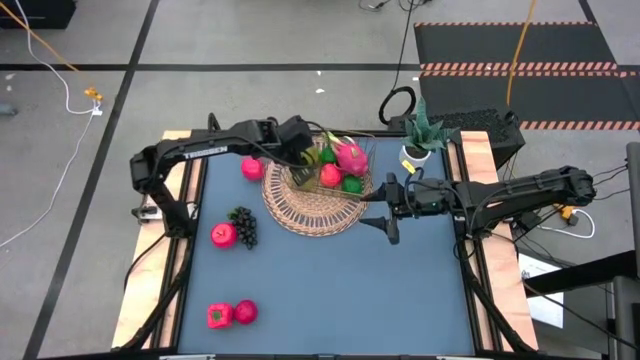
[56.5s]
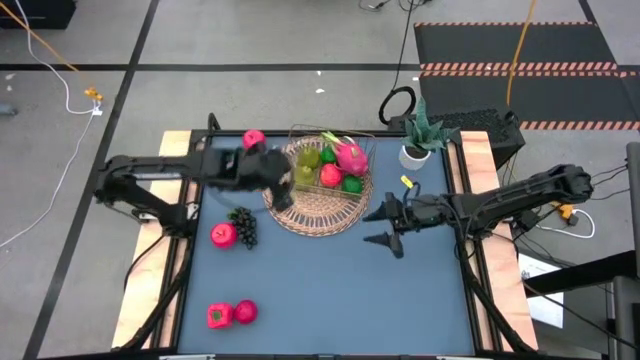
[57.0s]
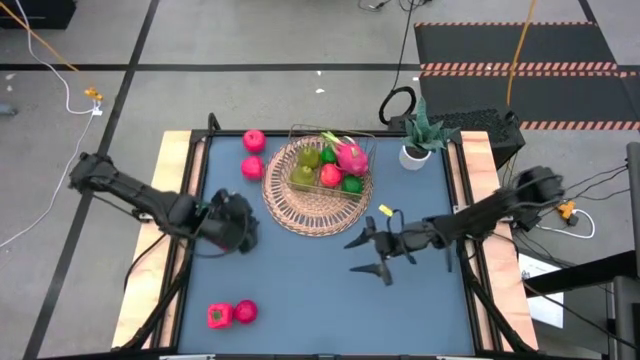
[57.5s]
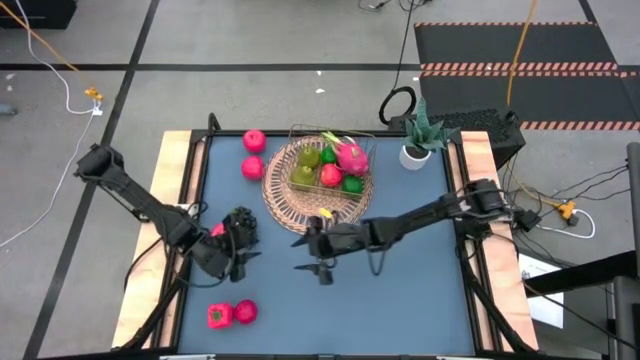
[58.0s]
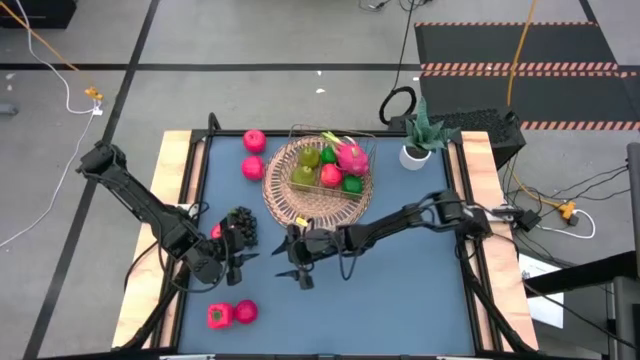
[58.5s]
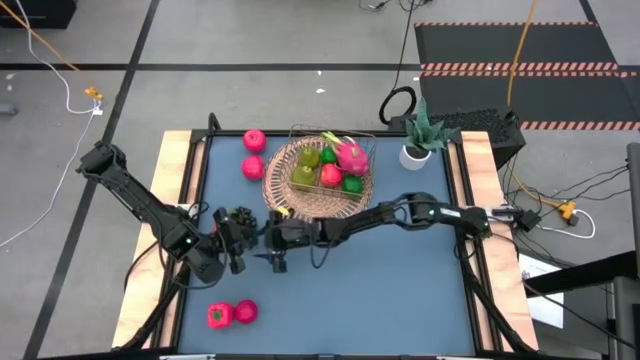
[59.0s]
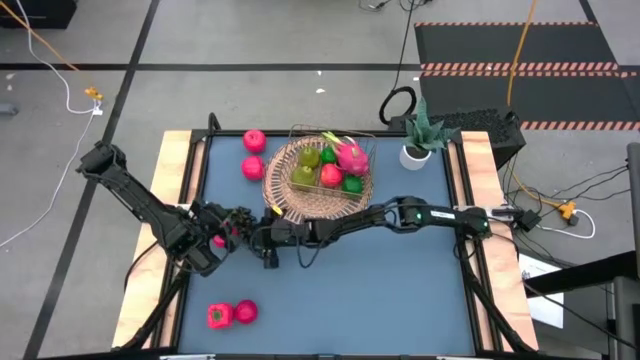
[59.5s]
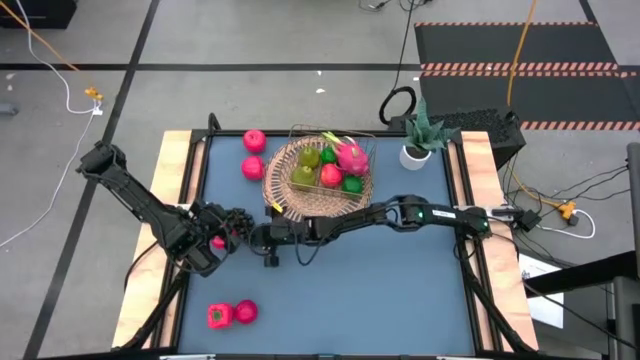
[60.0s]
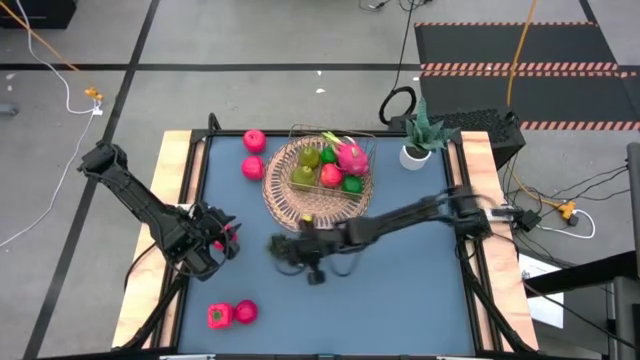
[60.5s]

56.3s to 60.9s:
Task: Build produce basket
Put the grapes into the gold wire basket

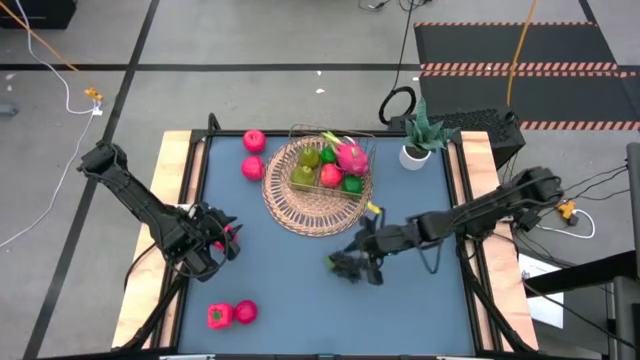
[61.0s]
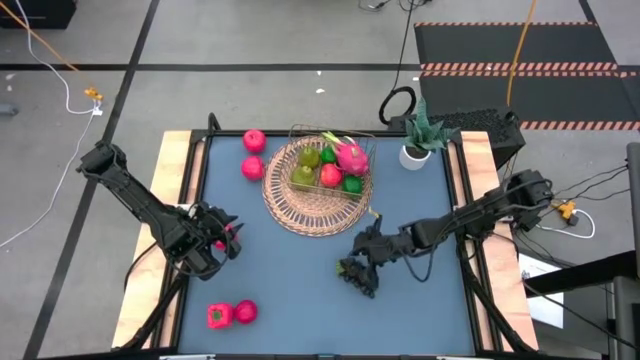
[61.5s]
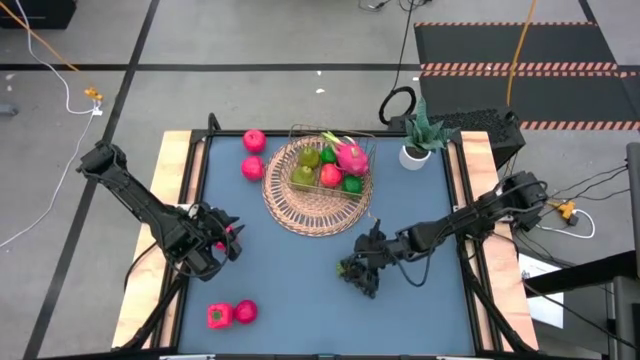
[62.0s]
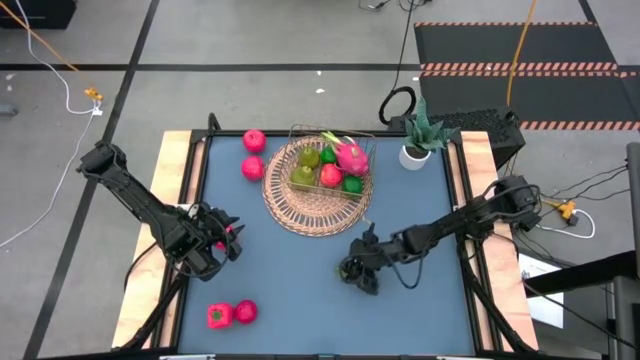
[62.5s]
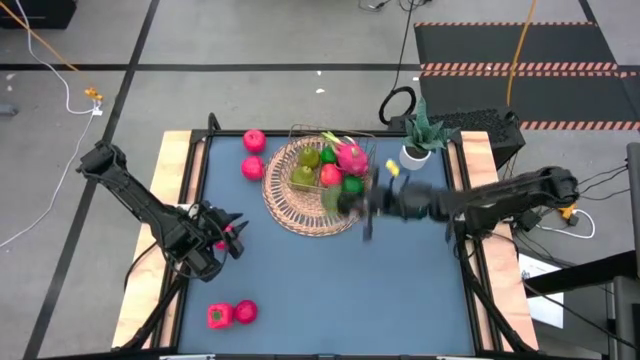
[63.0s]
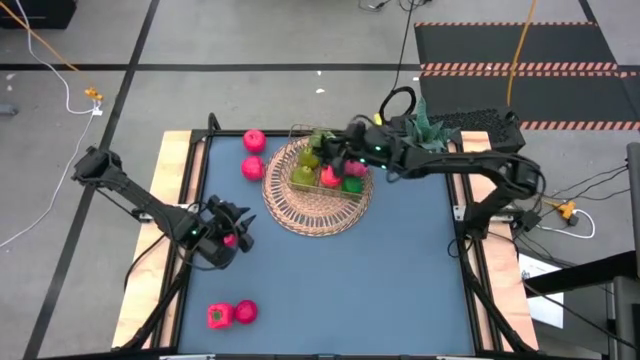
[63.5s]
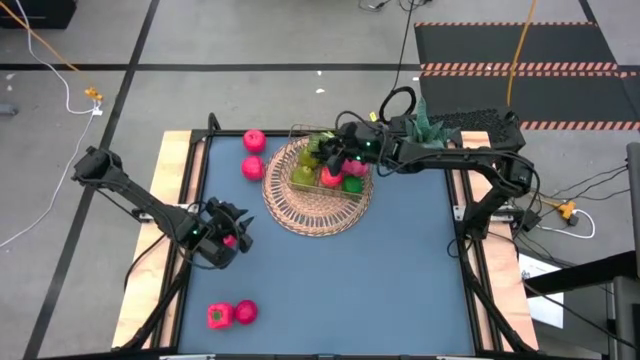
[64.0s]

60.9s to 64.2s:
Put the grapes into the gold wire basket

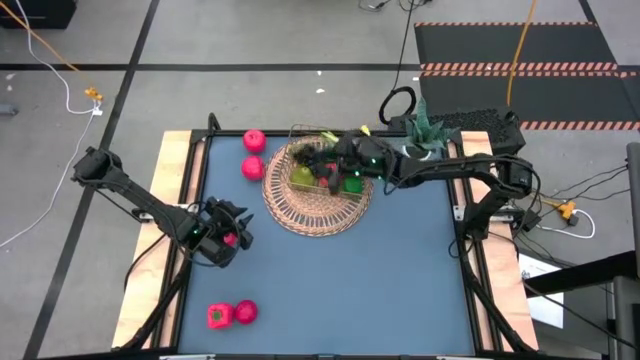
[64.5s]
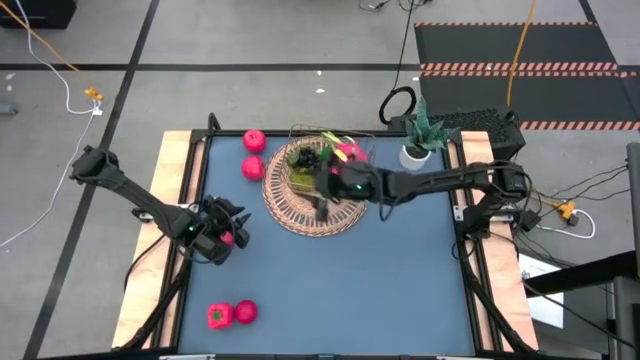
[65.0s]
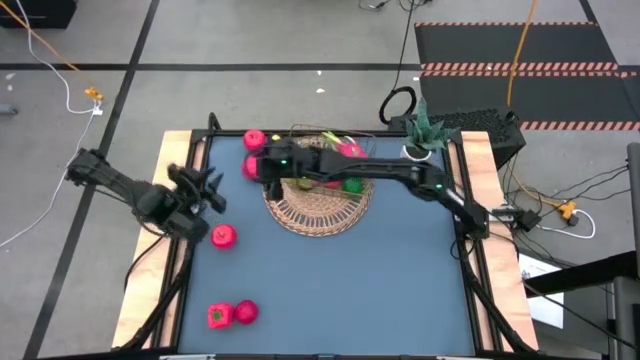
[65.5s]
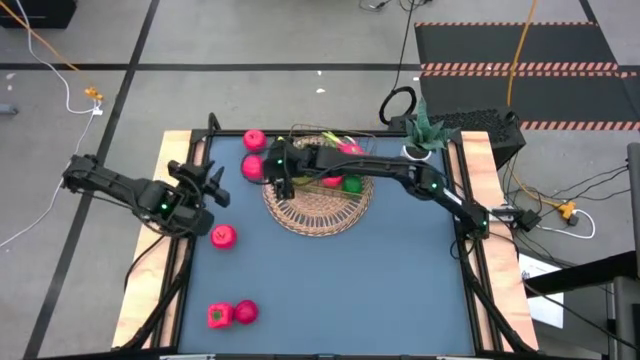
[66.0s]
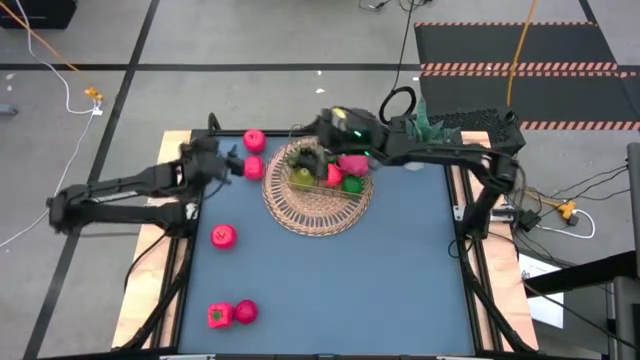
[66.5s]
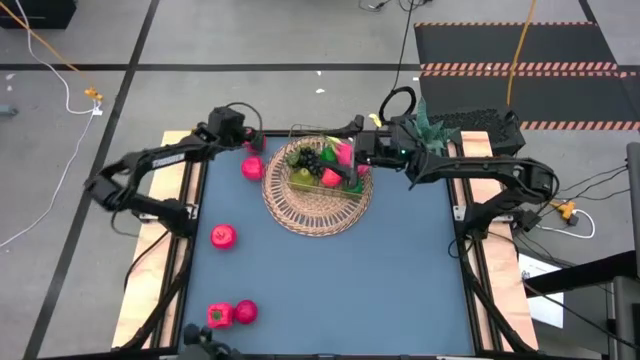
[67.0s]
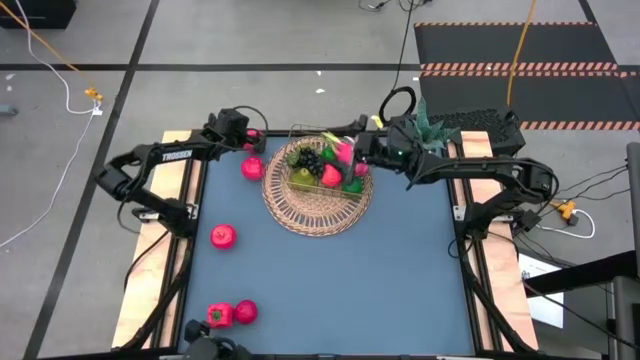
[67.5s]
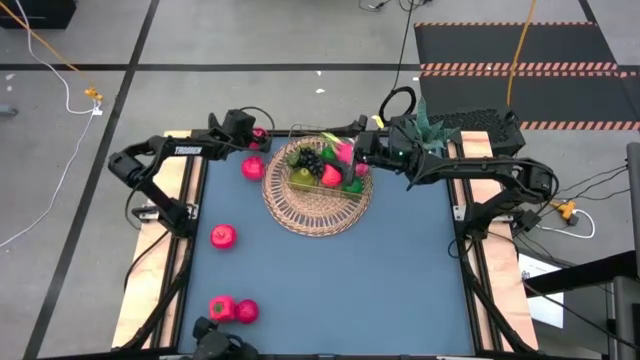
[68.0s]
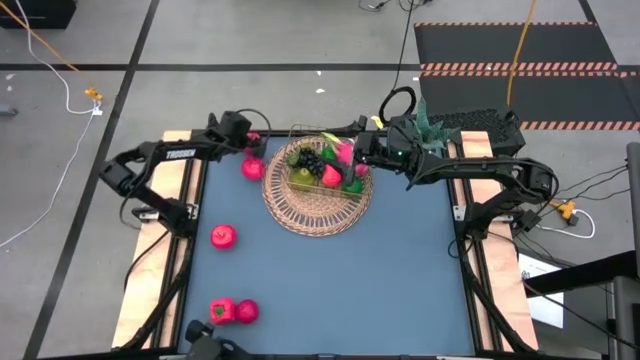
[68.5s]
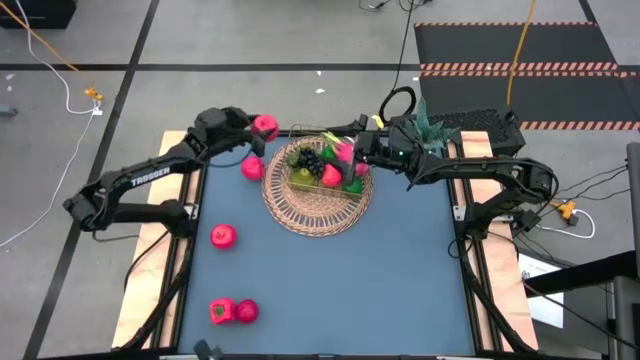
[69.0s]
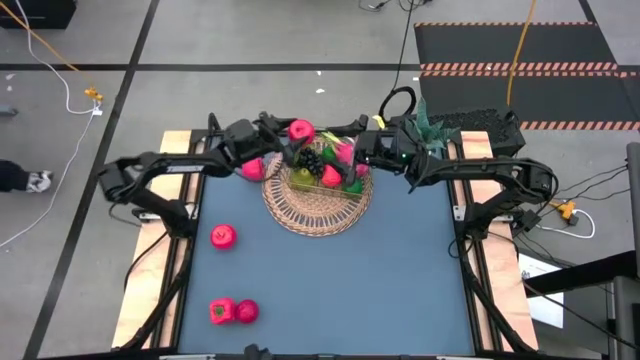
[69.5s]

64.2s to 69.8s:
Put the apple into the gold wire basket

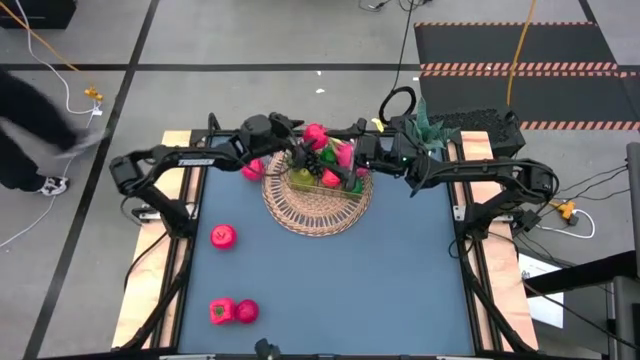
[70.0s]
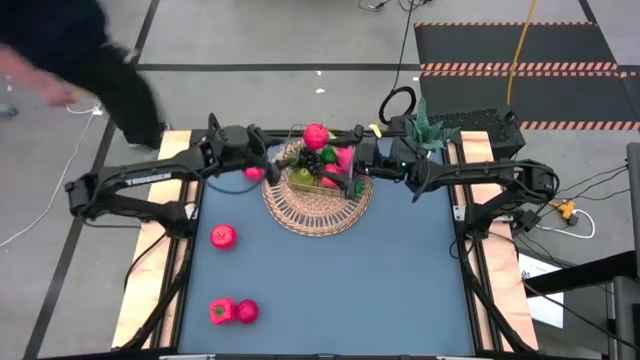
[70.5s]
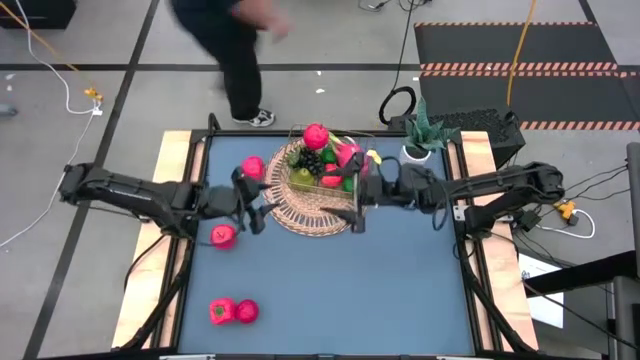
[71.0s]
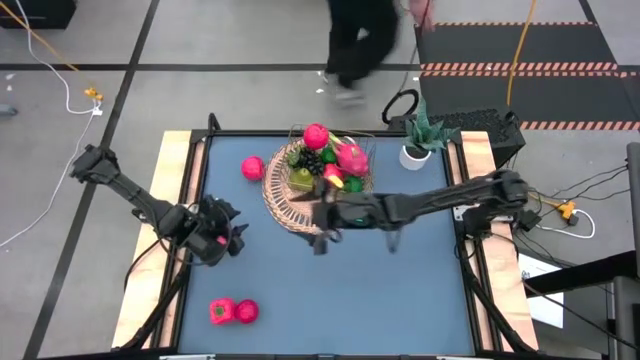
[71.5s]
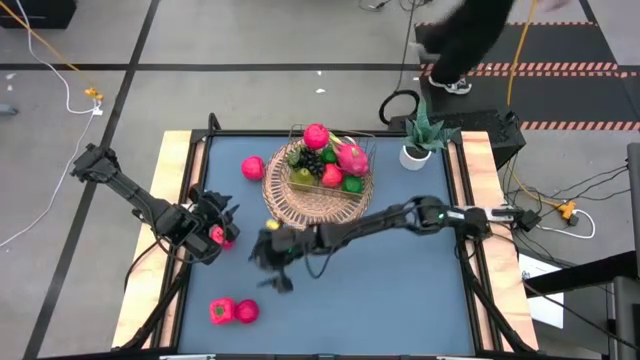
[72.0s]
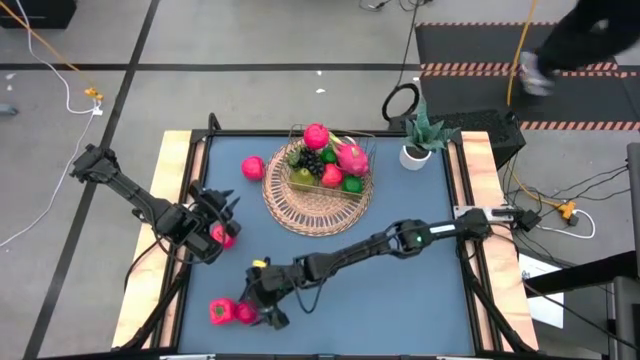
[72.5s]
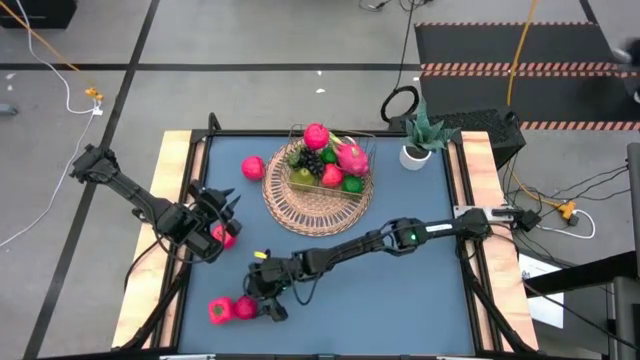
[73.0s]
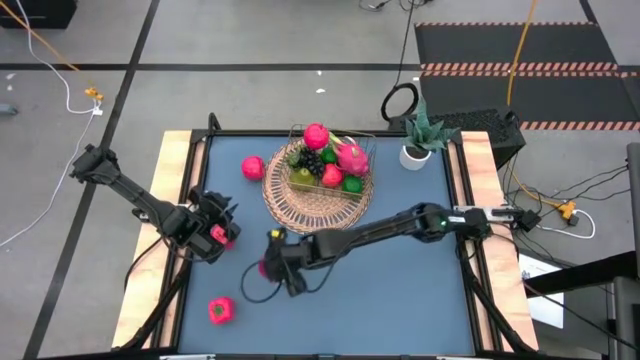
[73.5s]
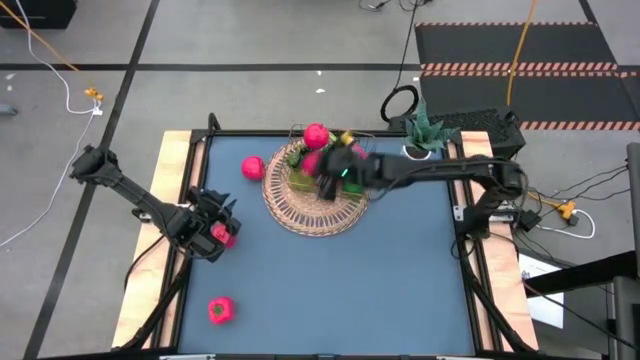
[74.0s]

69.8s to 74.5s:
Put the apple into the gold wire basket

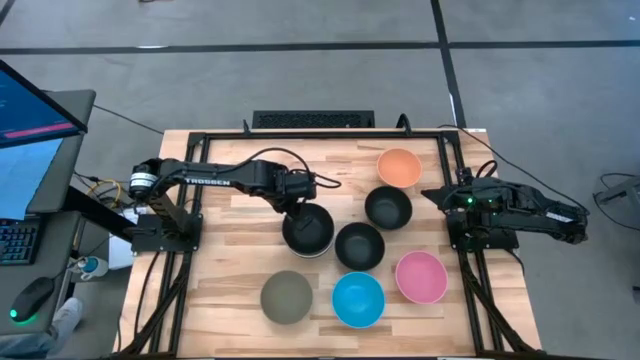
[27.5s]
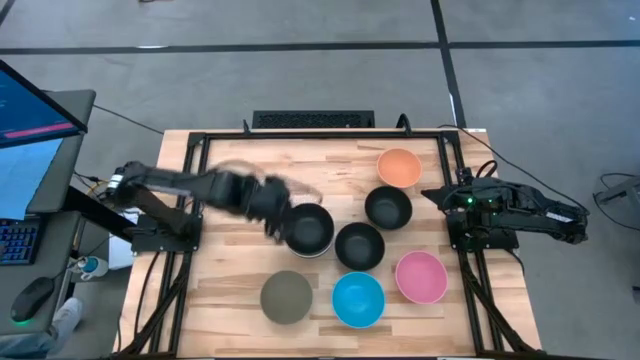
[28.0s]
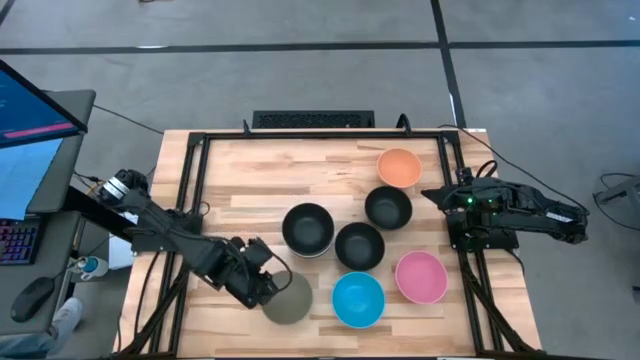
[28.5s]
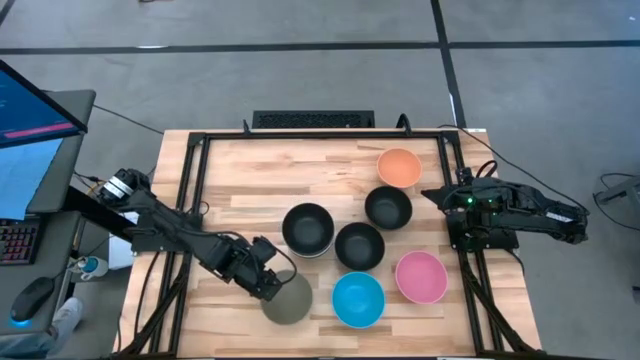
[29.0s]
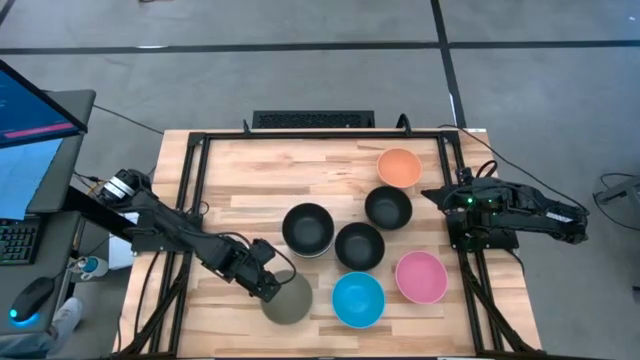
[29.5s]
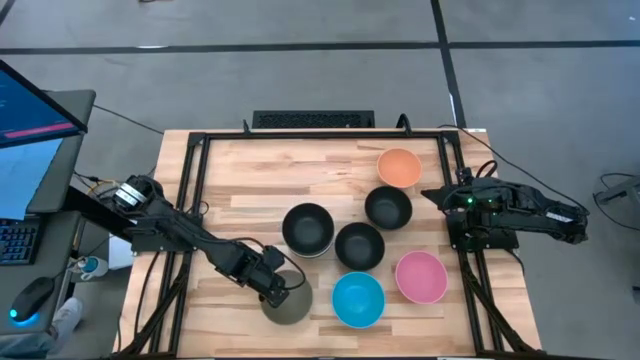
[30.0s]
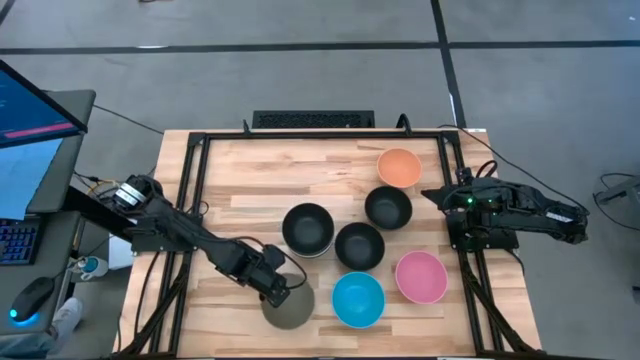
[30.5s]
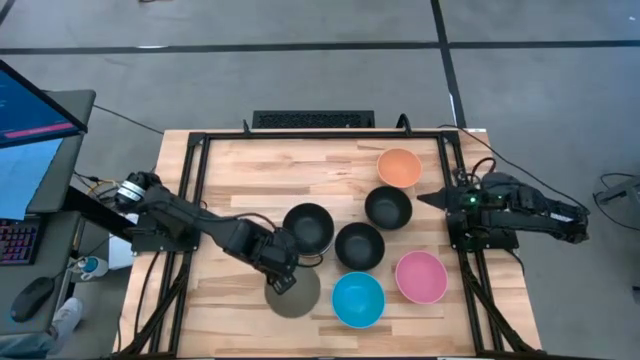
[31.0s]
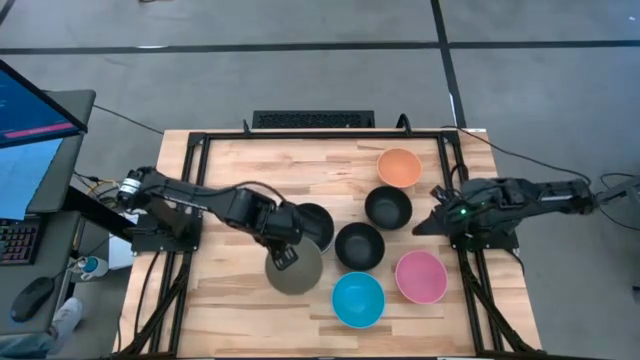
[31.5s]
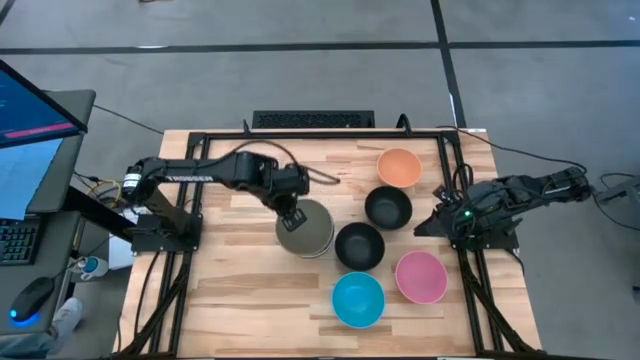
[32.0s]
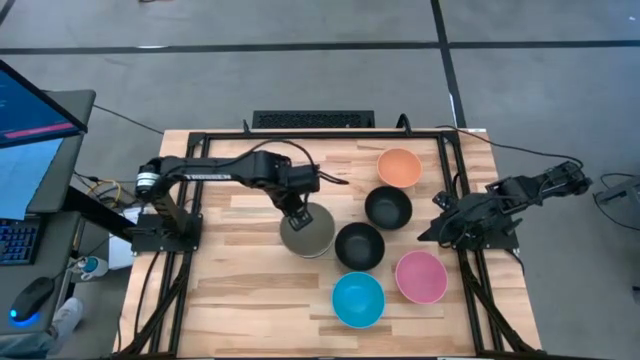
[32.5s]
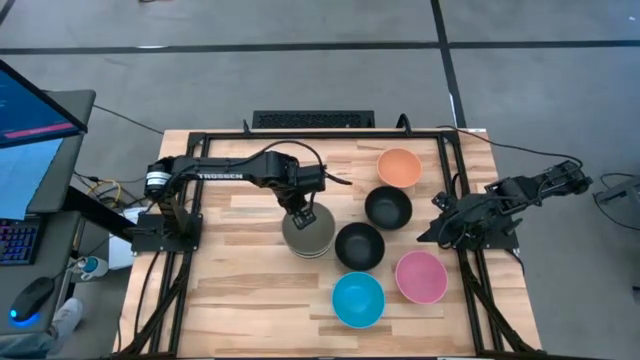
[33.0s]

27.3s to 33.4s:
Task: Nest bowls inside each other
Stack the gray bowl on top of the black bowl
